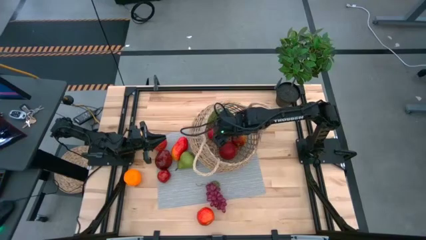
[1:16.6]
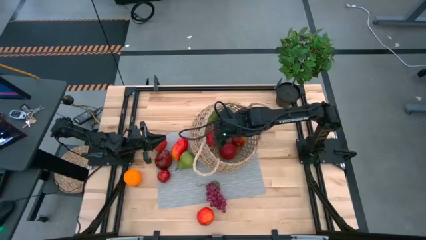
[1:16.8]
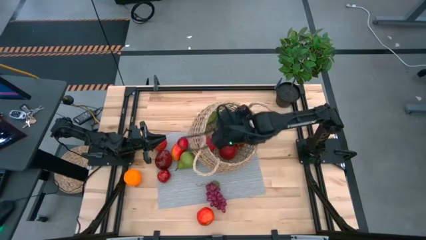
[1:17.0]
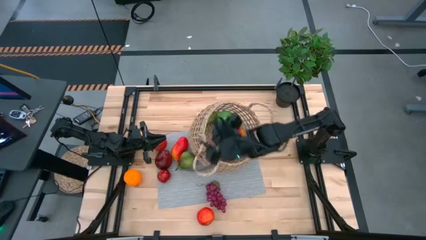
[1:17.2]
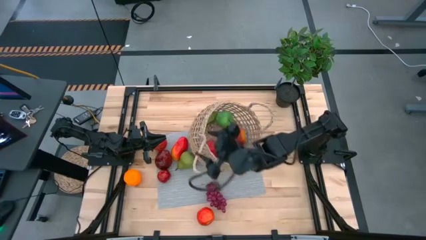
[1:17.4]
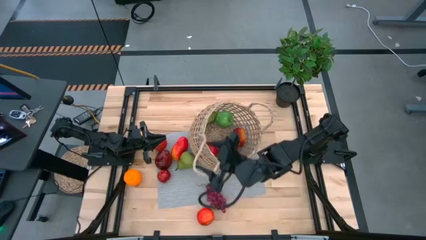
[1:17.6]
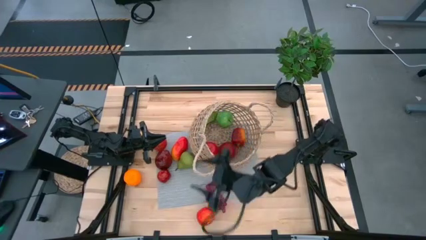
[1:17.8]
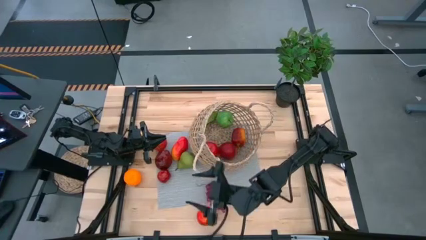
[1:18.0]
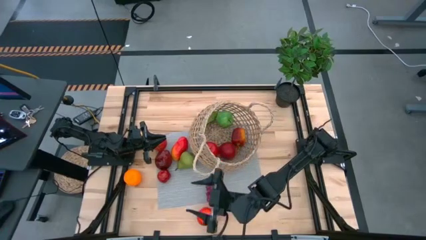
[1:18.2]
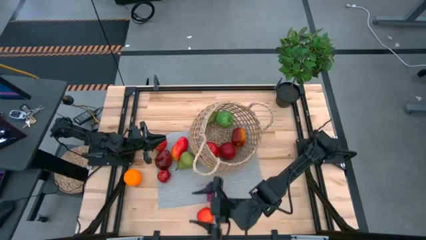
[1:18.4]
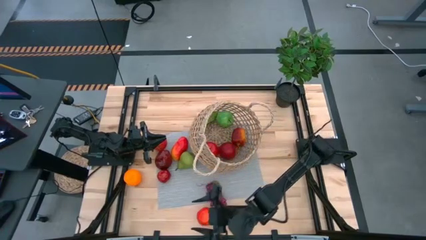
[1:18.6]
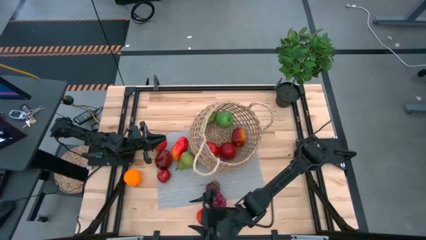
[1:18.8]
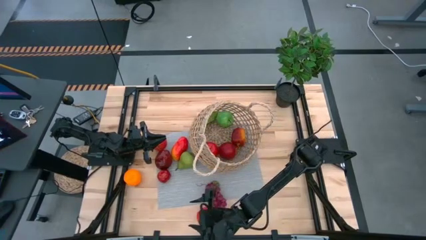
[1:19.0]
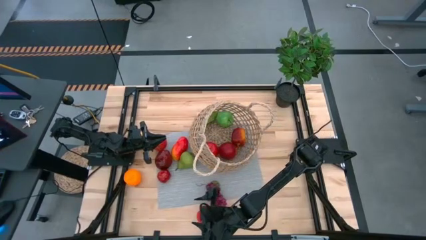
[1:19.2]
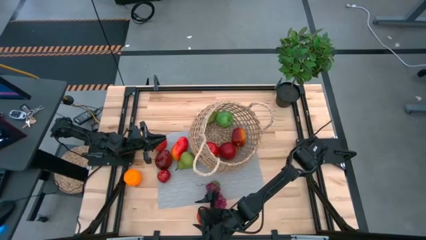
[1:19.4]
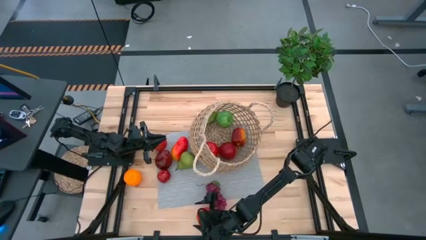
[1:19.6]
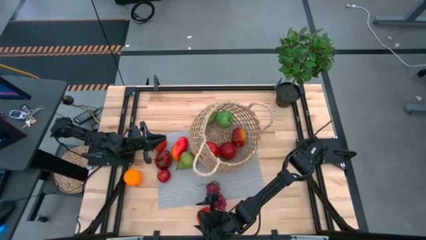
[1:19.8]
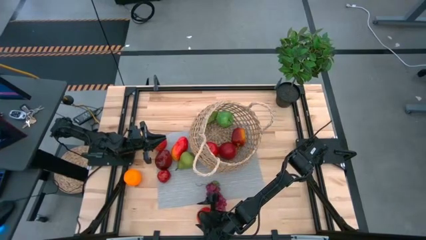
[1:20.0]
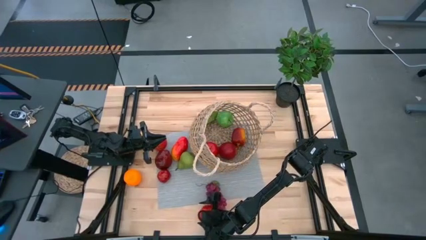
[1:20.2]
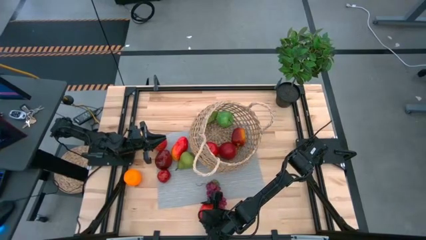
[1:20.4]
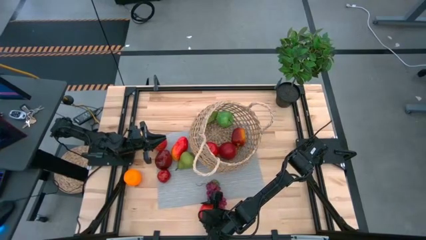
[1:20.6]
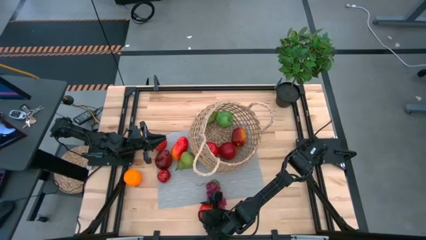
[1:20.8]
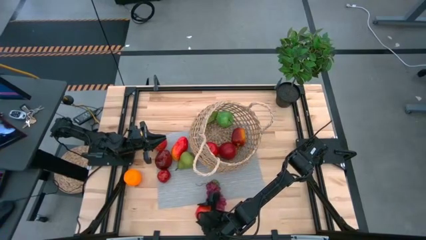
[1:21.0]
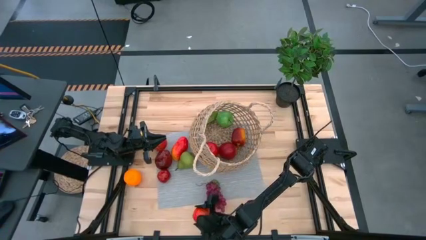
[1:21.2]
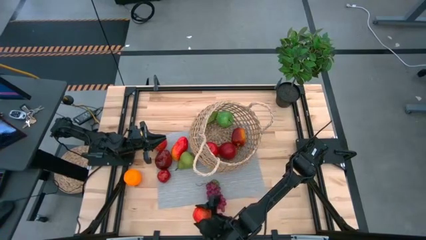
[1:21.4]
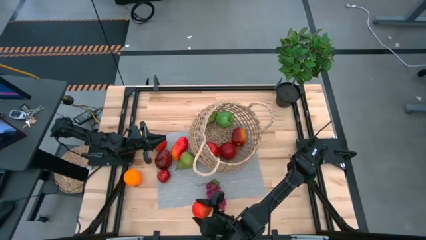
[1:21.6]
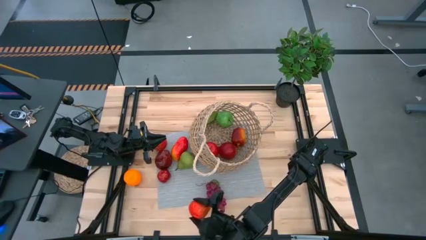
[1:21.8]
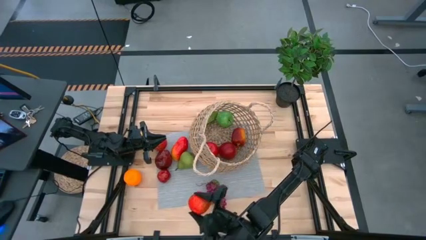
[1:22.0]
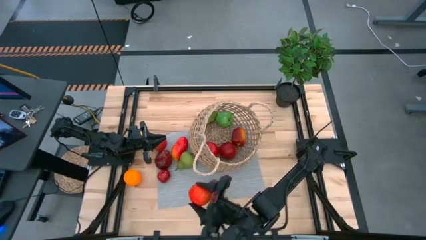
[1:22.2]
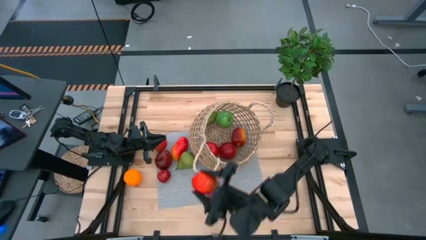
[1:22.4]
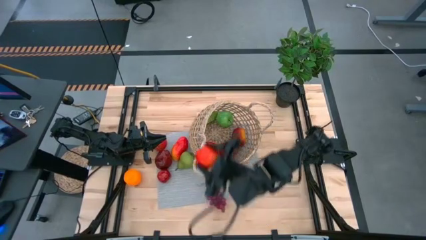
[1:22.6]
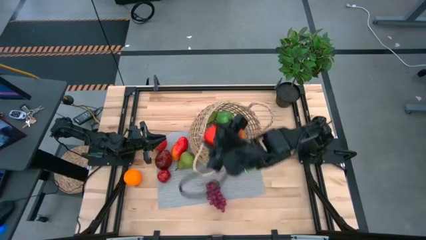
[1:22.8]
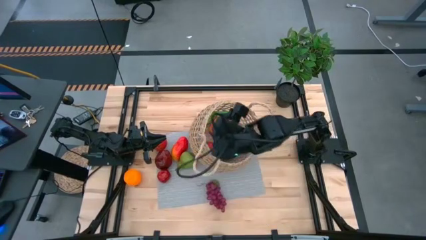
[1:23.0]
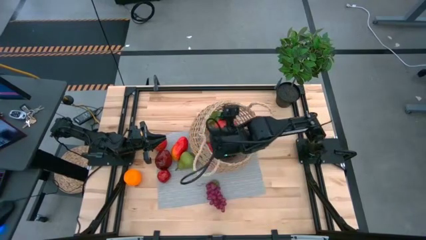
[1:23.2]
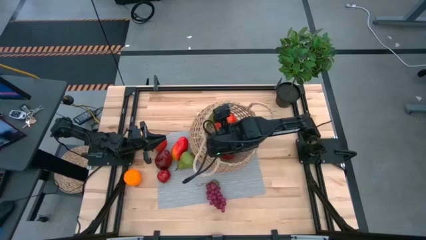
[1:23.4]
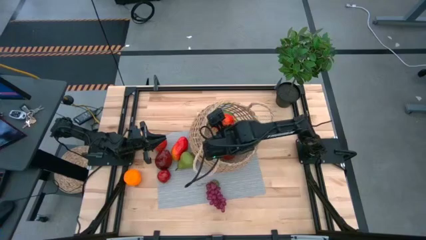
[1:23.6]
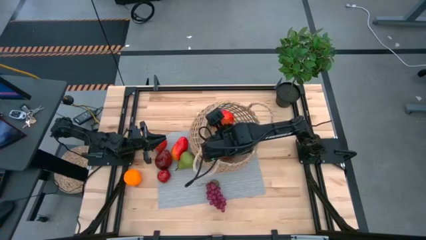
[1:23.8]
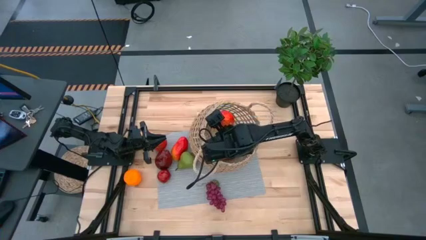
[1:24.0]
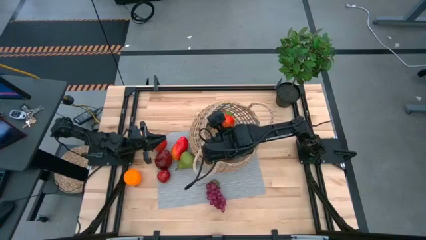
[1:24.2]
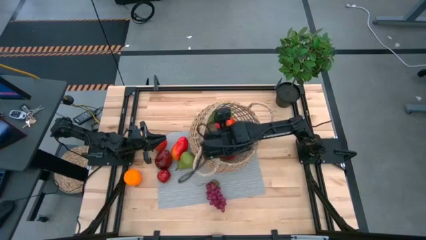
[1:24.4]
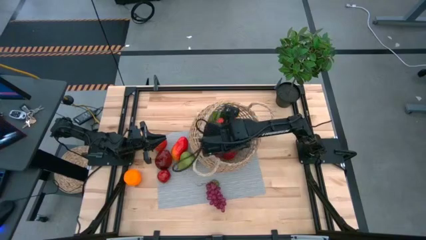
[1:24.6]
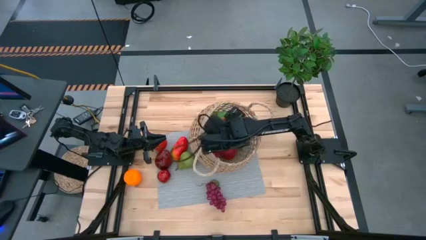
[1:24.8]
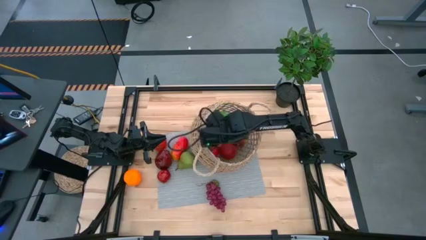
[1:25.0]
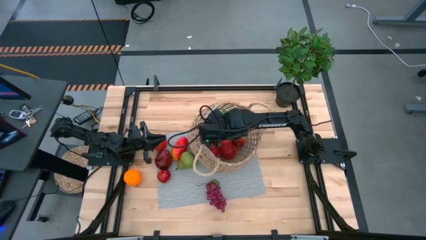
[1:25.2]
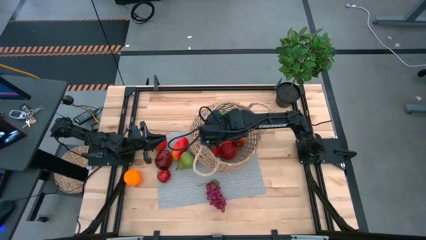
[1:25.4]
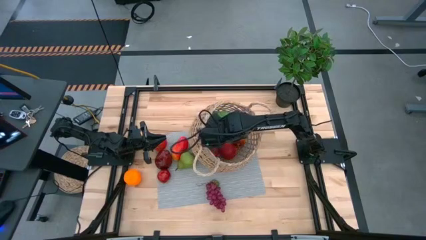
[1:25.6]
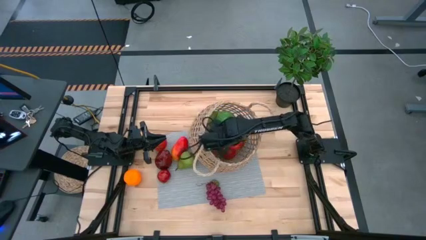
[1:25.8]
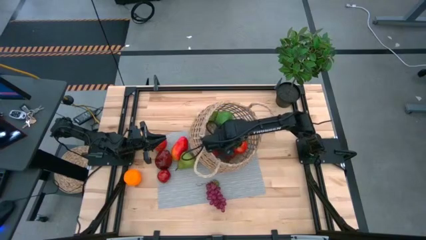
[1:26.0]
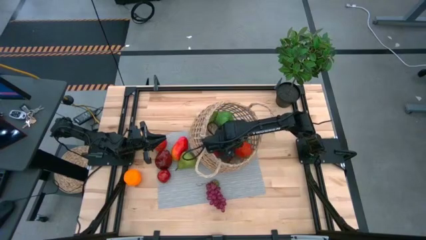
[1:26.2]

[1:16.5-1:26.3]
Task: Build produce basket
Put the red apple into the brown basket

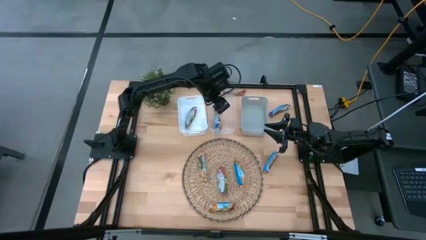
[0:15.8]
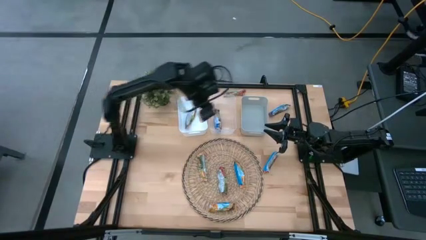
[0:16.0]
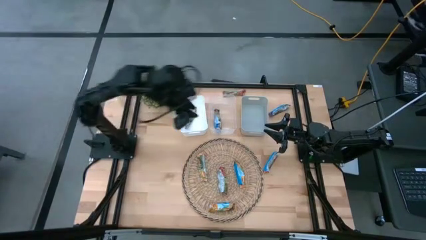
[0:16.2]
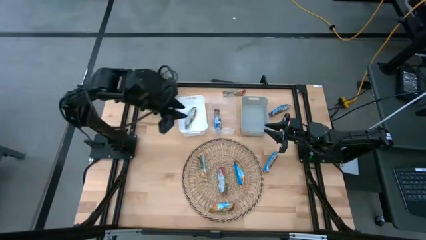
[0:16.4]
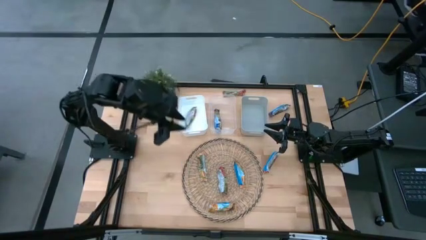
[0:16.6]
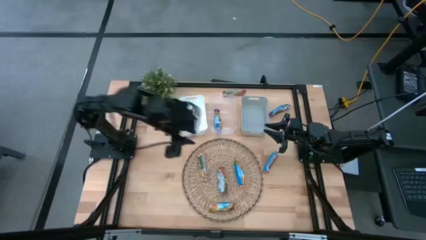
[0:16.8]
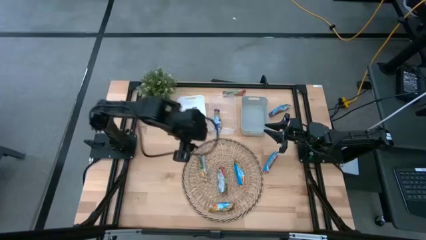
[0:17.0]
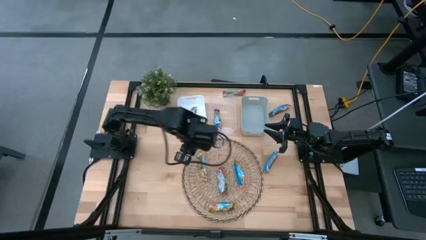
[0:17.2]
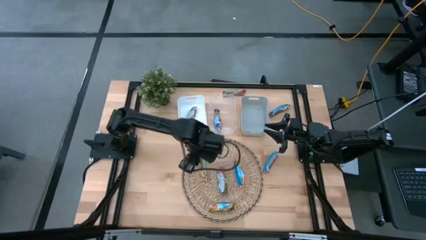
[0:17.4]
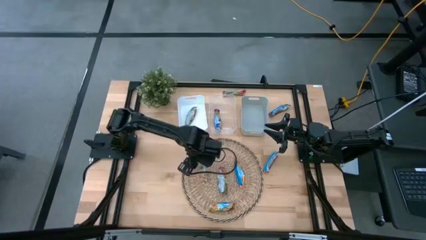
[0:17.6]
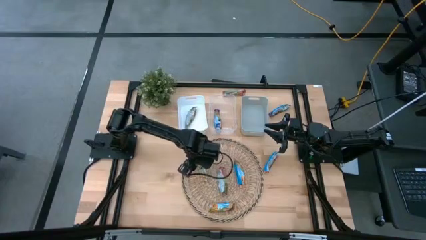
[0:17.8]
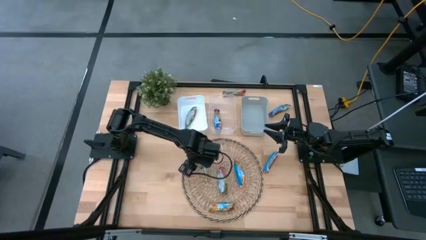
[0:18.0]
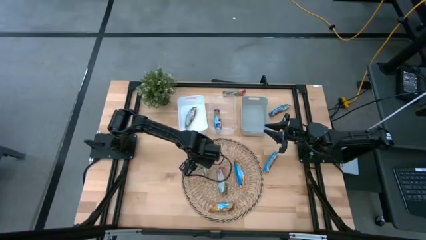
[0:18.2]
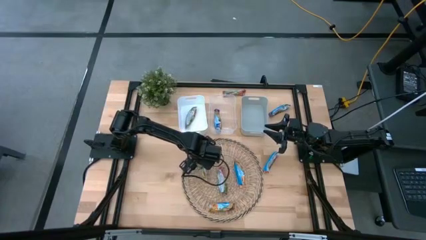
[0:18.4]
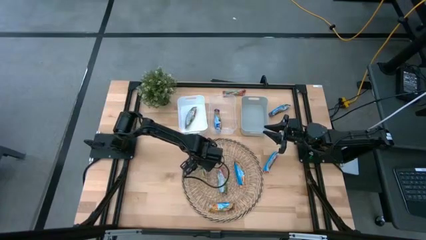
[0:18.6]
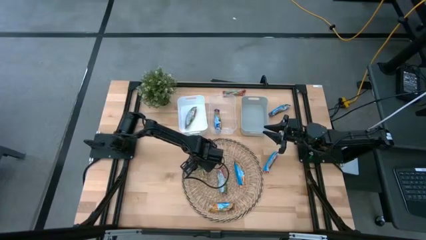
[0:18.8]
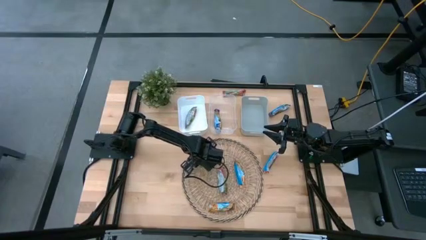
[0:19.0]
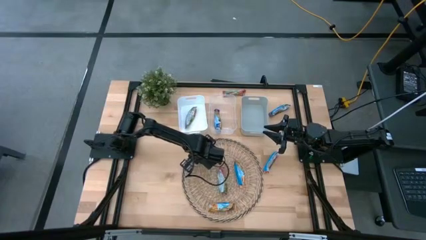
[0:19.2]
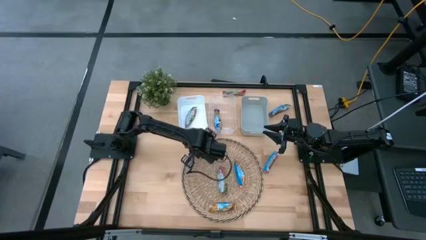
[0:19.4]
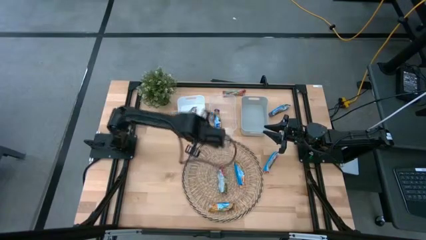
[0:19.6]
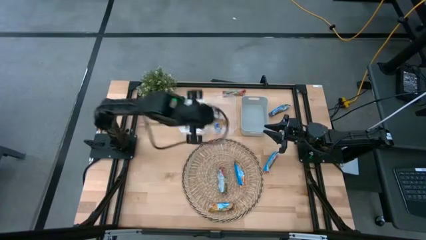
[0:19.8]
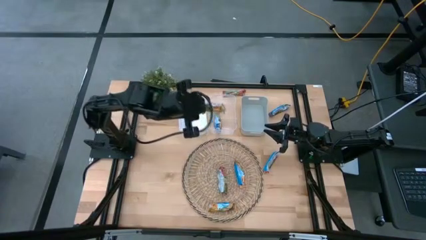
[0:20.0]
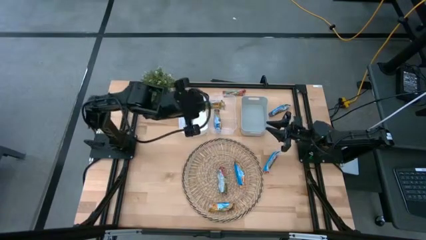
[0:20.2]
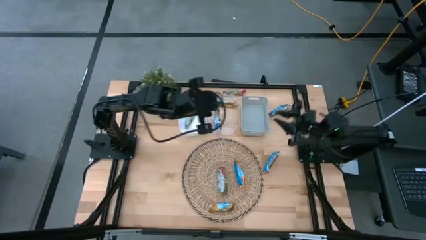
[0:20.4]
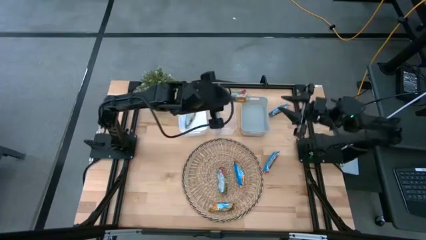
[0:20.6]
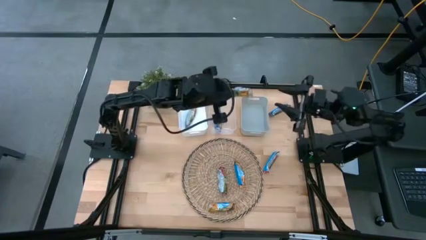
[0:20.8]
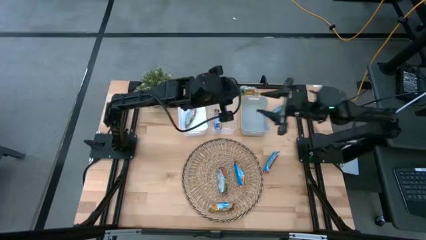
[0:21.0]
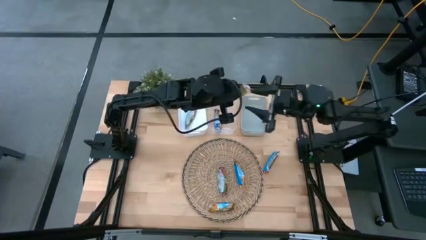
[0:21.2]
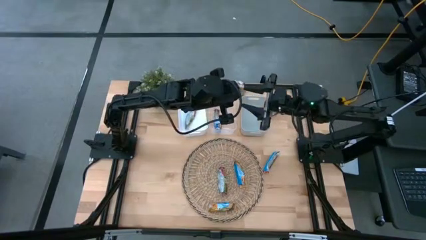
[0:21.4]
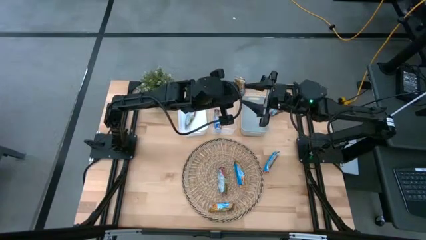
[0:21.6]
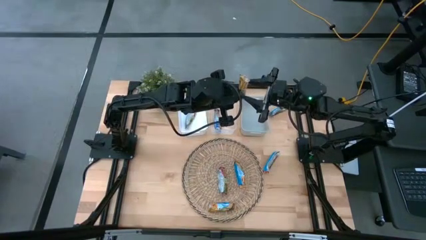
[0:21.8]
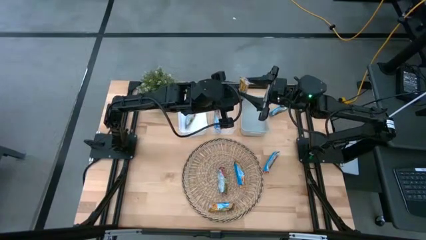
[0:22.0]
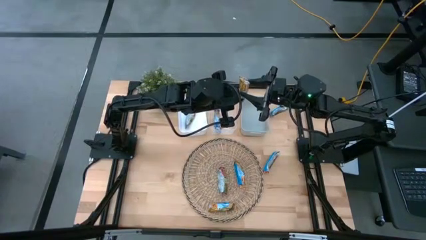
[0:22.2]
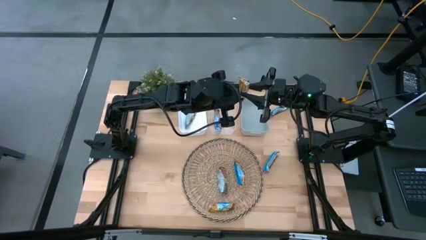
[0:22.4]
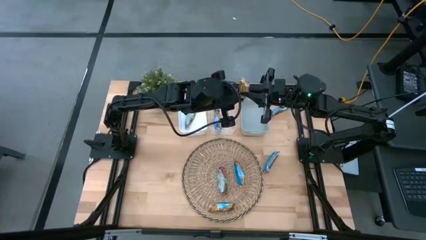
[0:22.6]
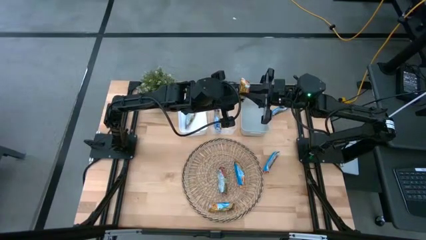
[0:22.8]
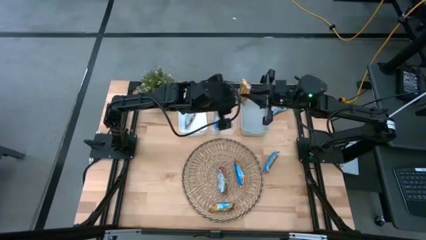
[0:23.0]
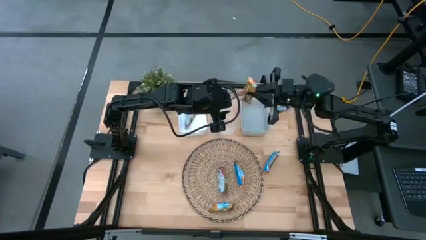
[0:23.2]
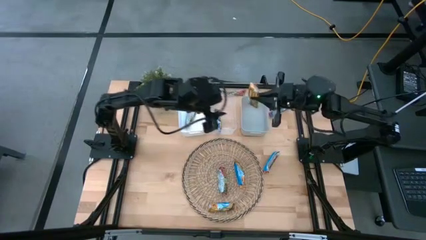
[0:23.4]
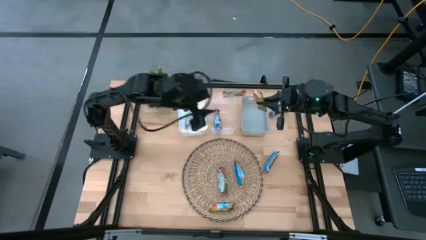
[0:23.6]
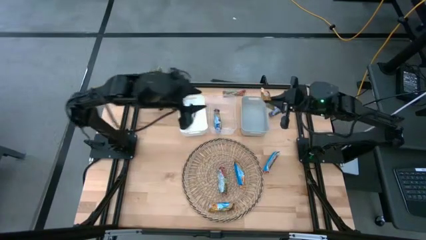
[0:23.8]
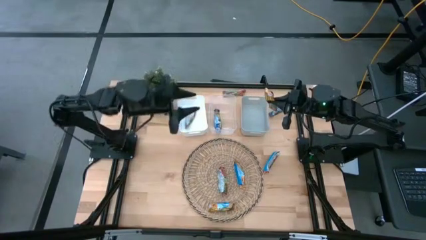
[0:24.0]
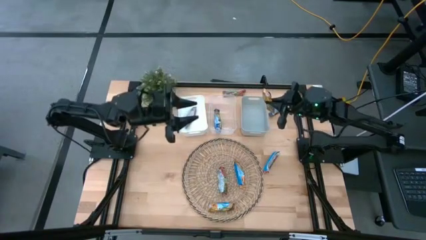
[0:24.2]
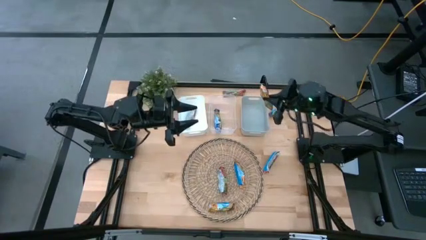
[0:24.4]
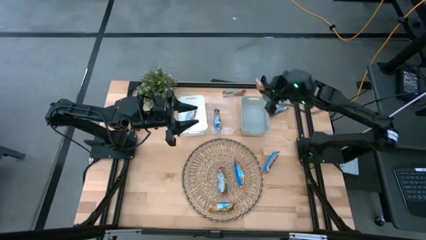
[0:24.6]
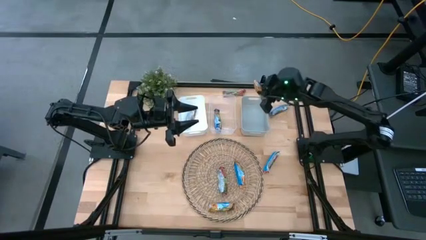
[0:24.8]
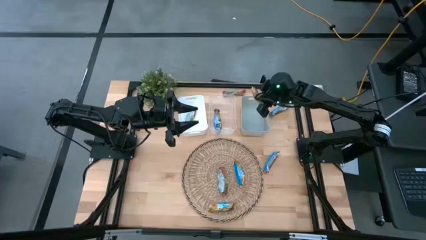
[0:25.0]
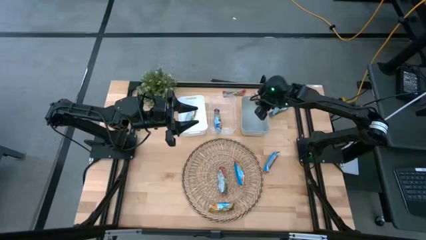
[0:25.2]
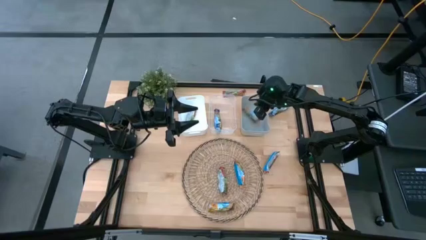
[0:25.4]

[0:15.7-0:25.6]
Task: Pick and place Granola Bars by type
Put the middle left yellow granola bar into the gray bin
